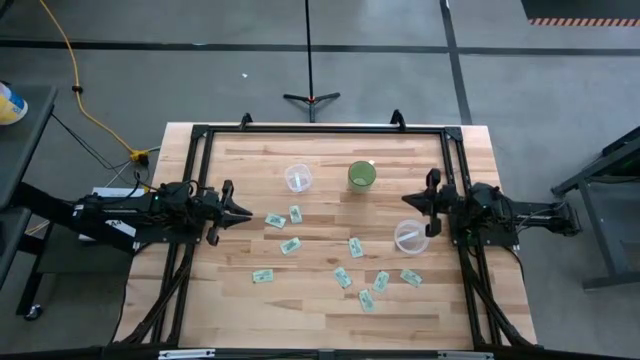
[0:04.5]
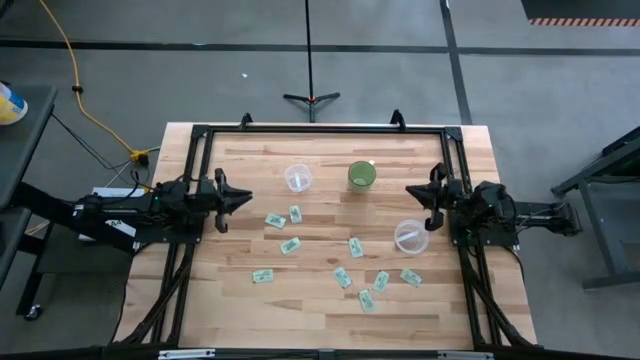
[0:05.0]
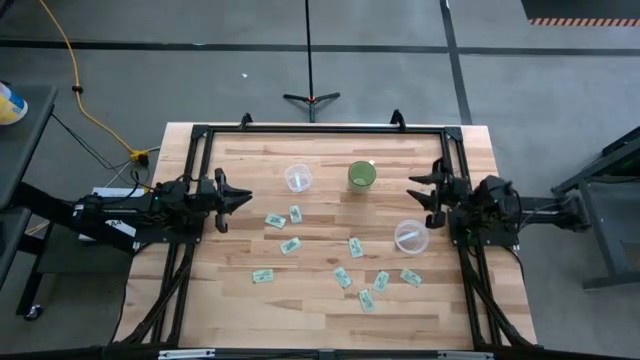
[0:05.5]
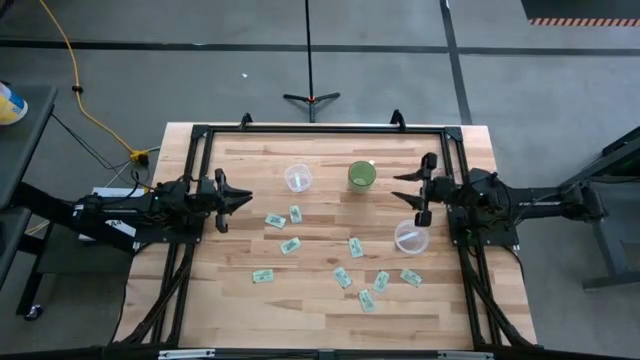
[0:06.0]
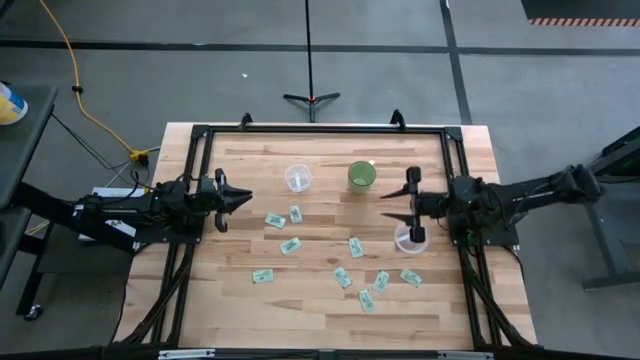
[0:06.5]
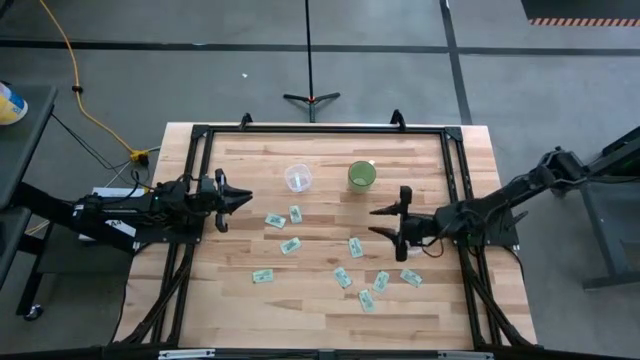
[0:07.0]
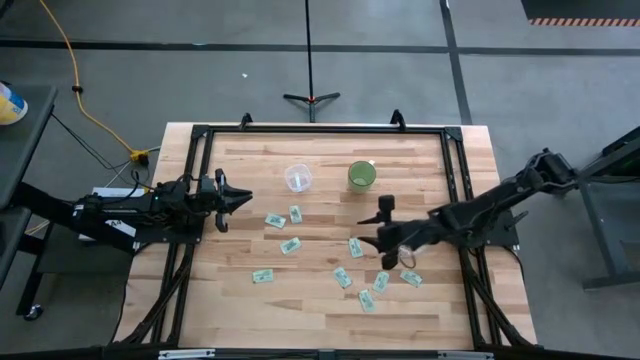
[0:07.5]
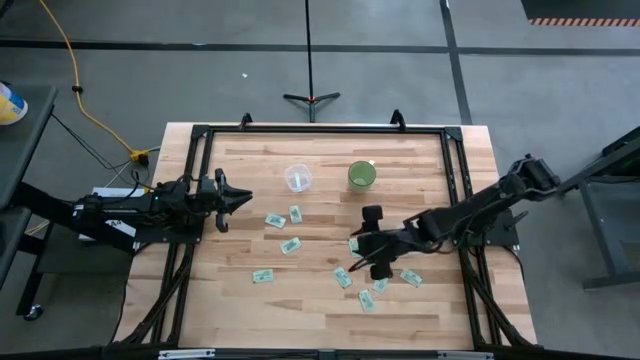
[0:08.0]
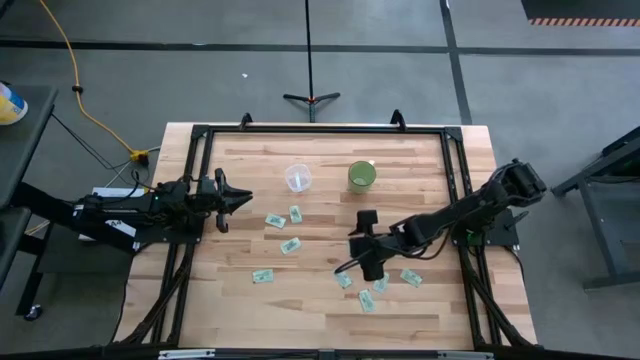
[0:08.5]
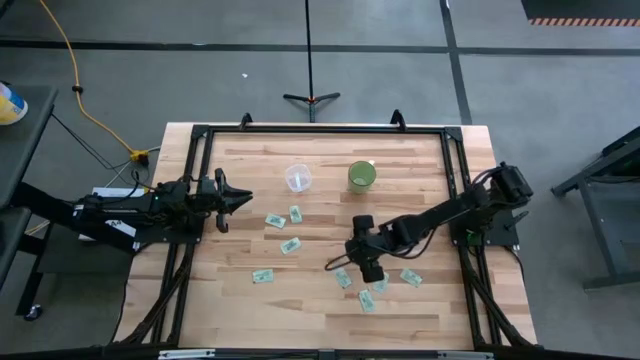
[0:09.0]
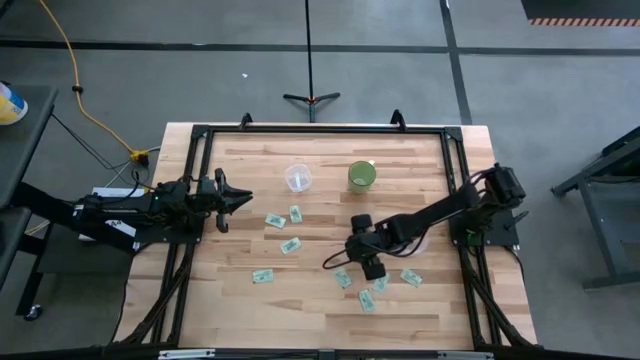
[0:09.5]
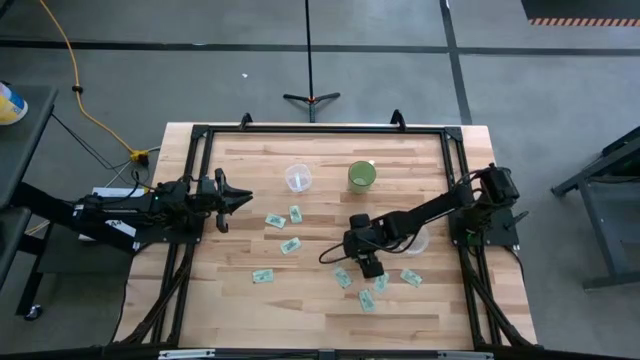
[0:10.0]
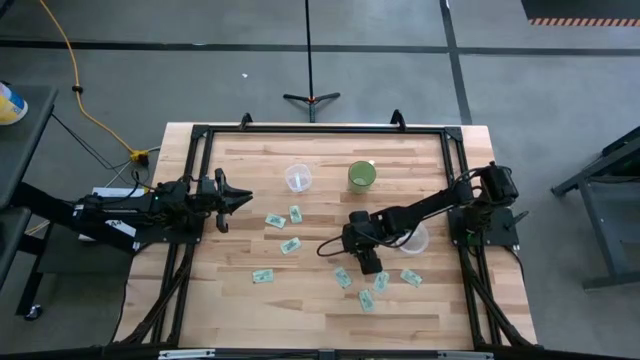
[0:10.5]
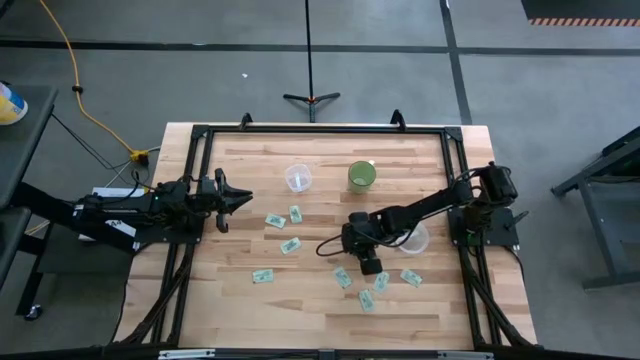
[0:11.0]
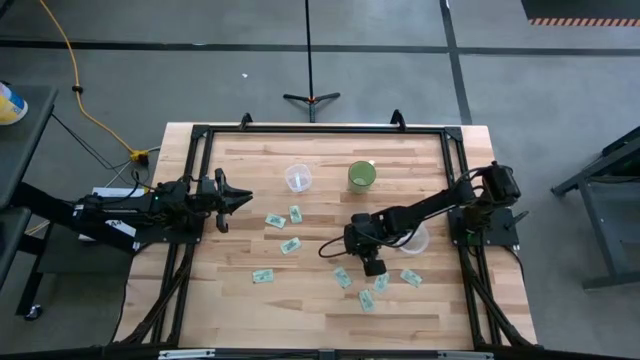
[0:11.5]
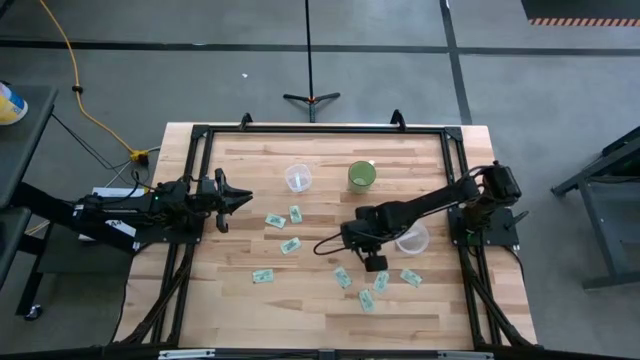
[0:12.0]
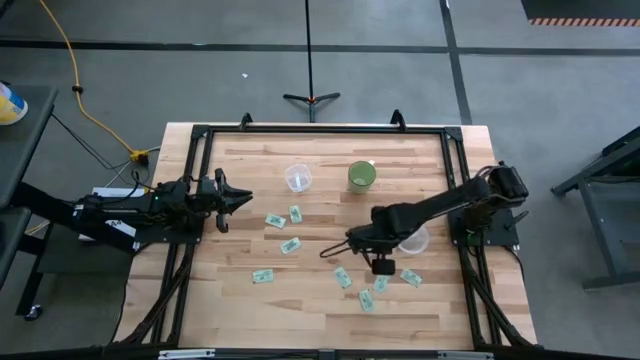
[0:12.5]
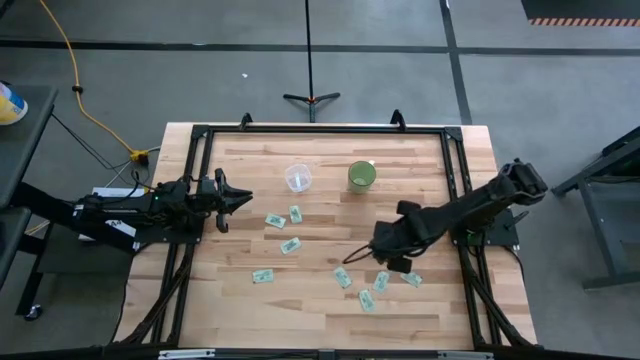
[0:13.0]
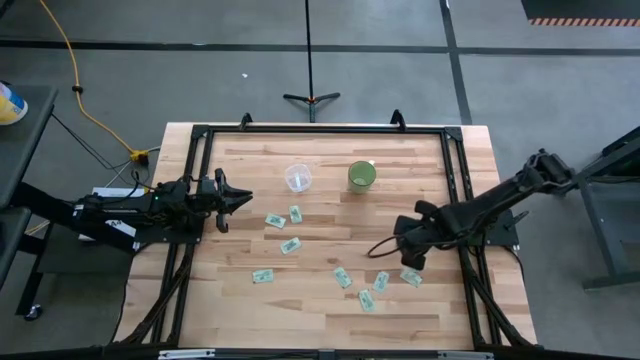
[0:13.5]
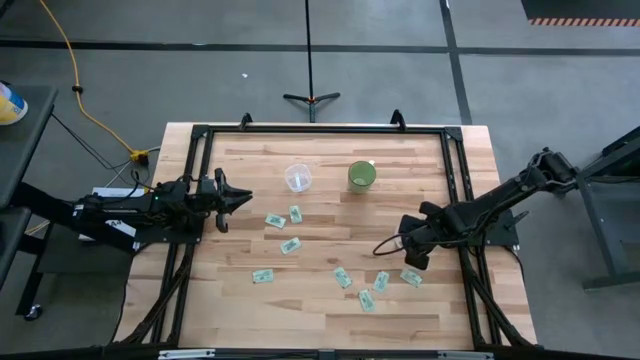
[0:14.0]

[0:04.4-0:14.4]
Task: Pick and place items into bin
Put the white sweetener packet into the right transparent bin

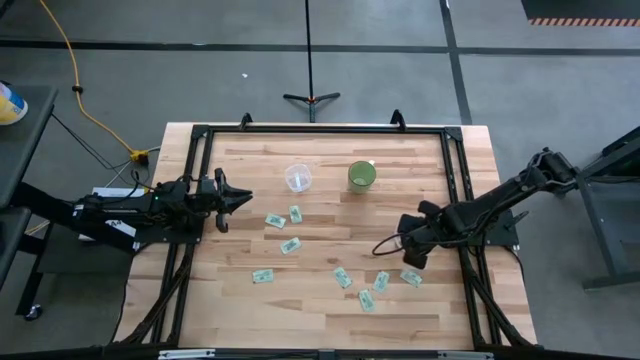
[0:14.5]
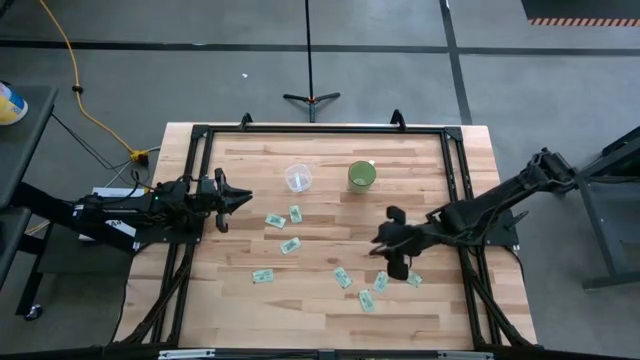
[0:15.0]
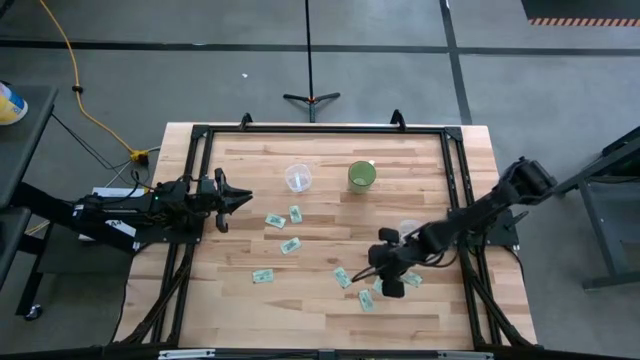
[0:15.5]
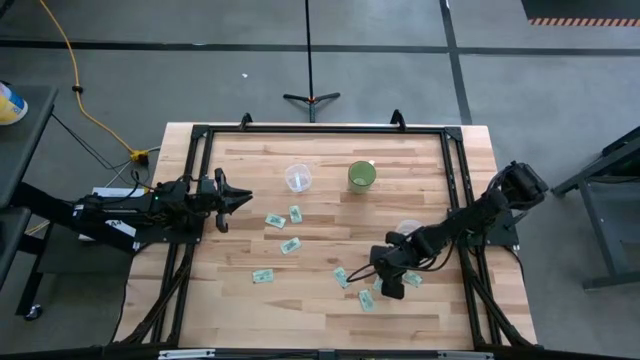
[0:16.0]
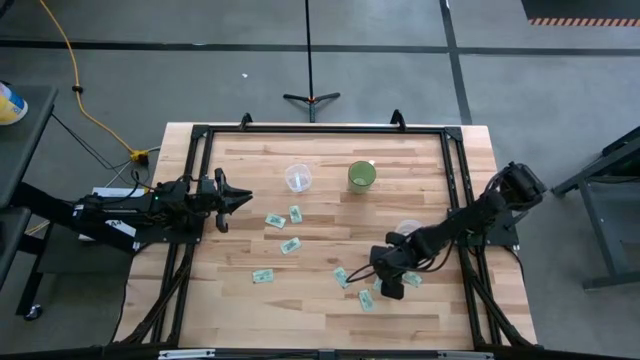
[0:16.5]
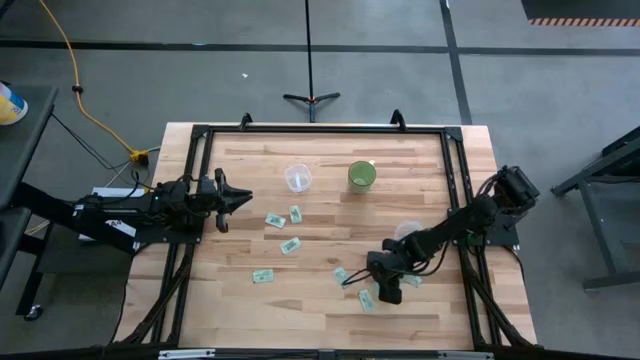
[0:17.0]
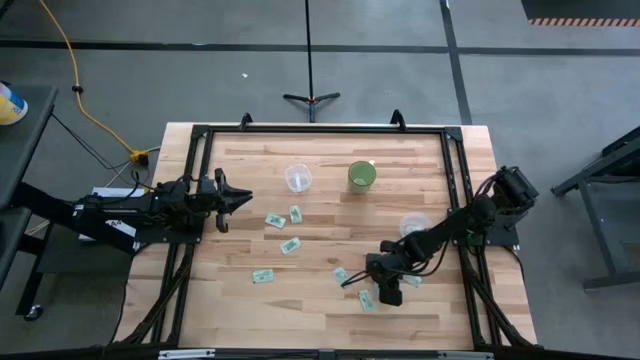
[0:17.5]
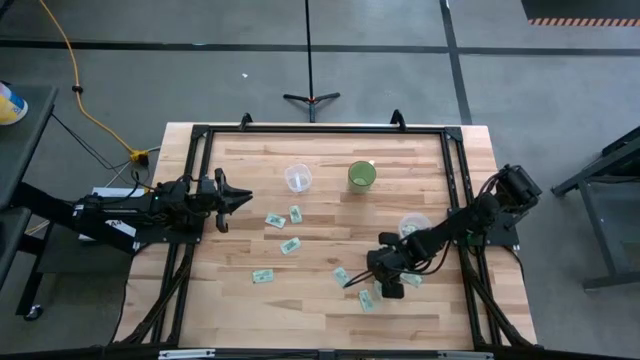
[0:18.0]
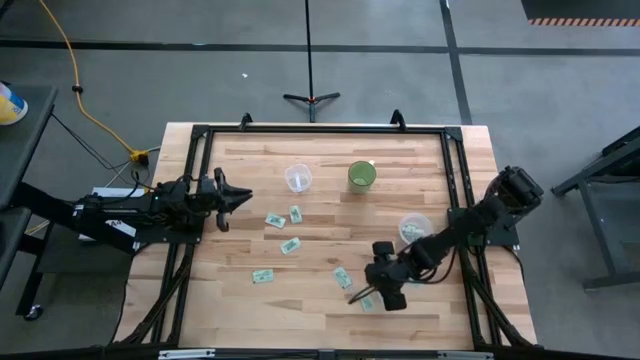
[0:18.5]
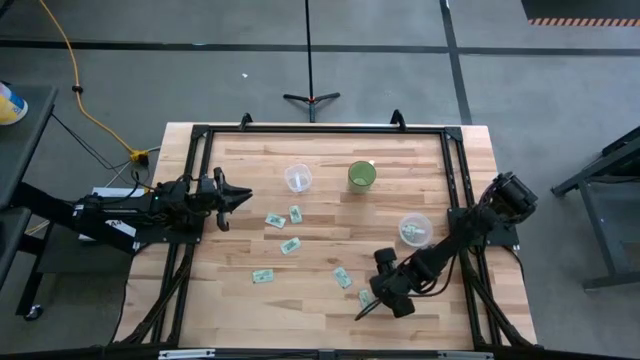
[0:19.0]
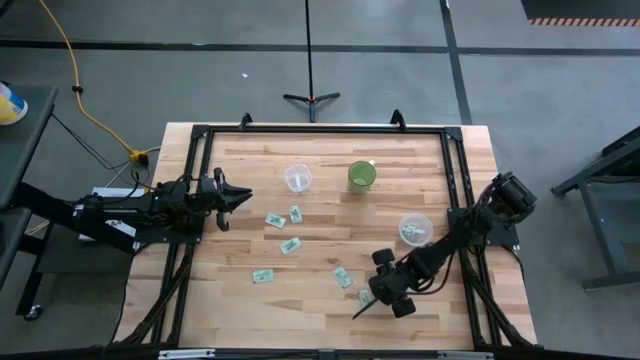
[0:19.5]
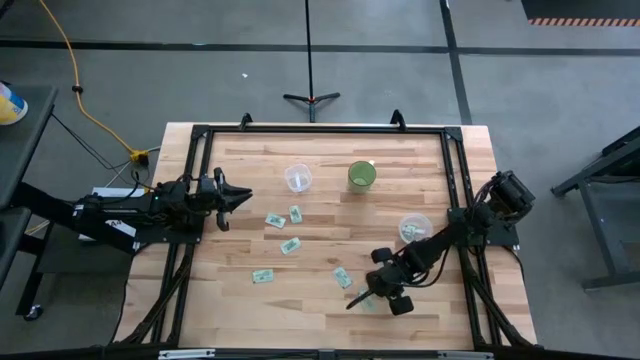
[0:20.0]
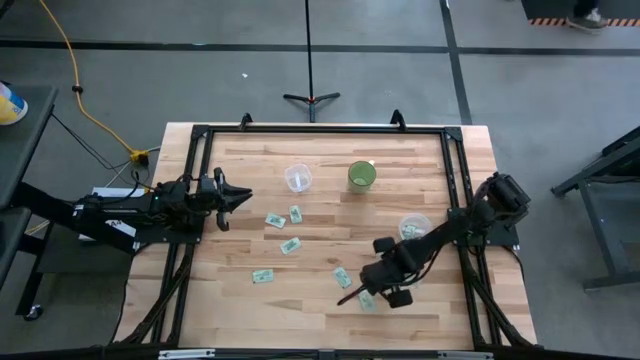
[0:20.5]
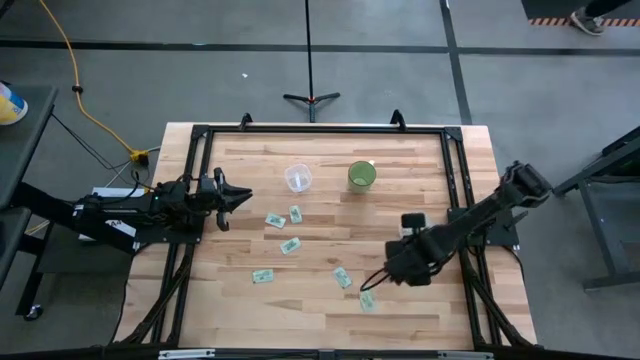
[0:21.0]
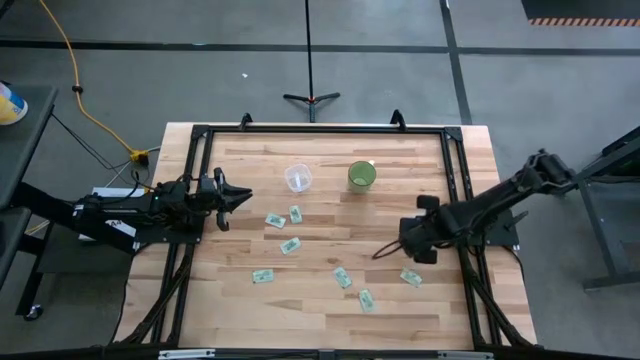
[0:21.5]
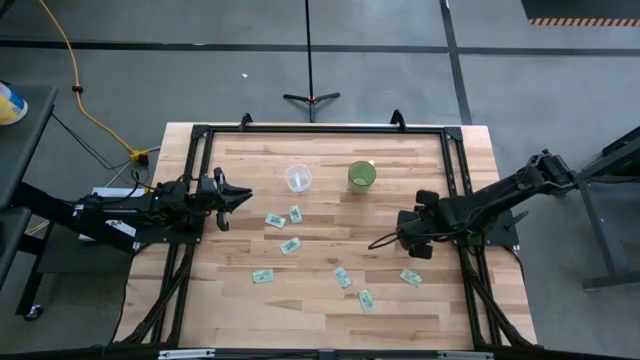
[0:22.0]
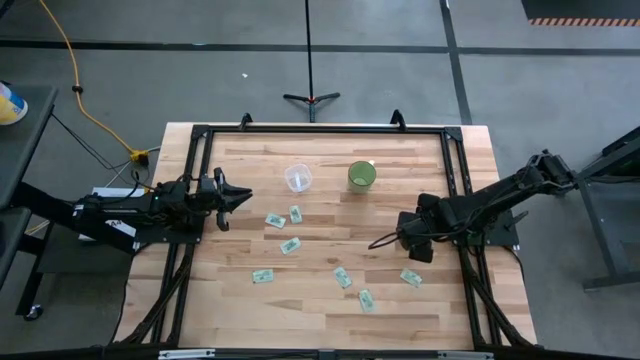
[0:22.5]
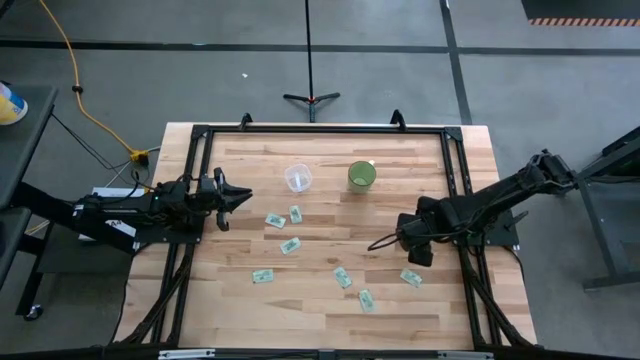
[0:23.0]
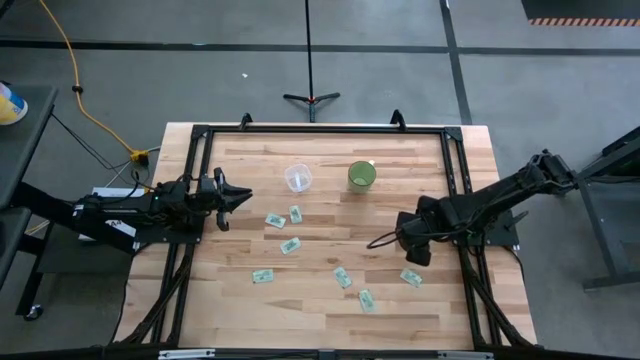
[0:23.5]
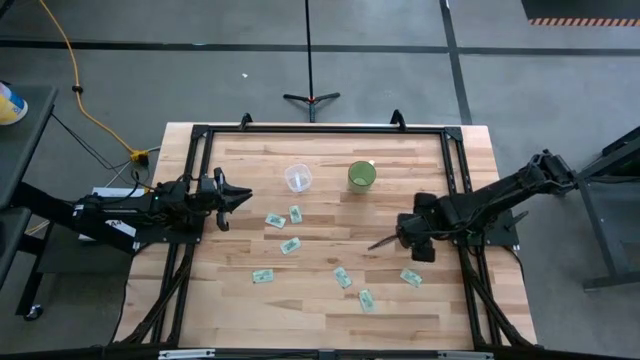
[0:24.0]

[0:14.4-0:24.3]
Put the white sweetener packet into the right transparent bin
